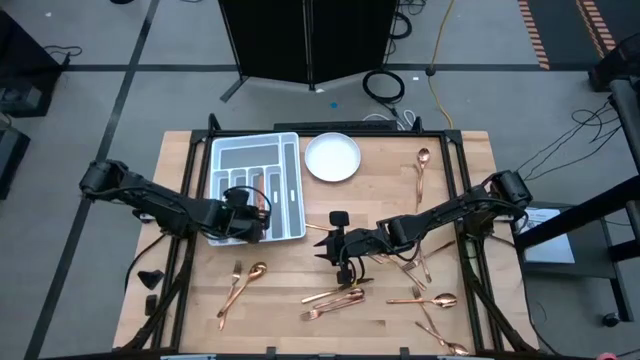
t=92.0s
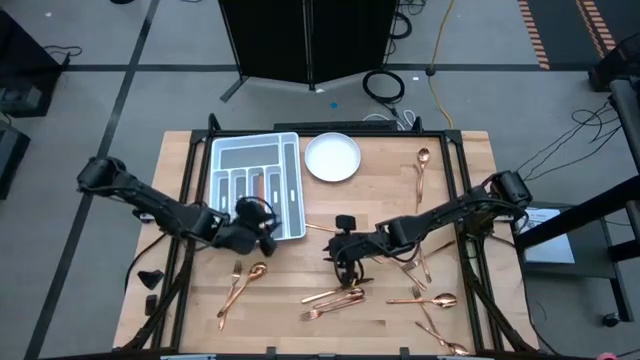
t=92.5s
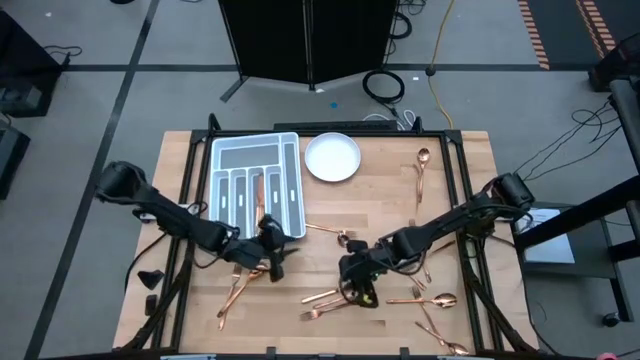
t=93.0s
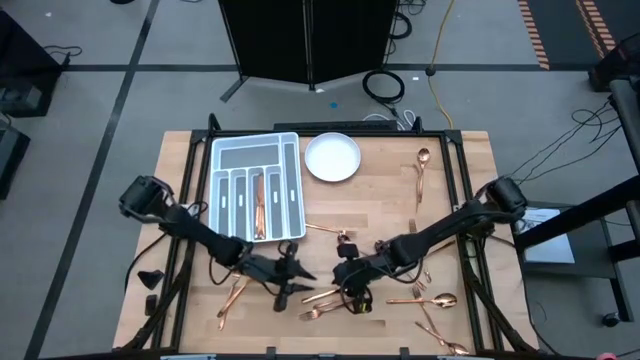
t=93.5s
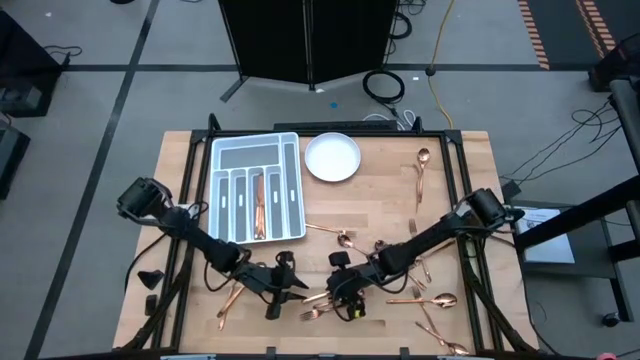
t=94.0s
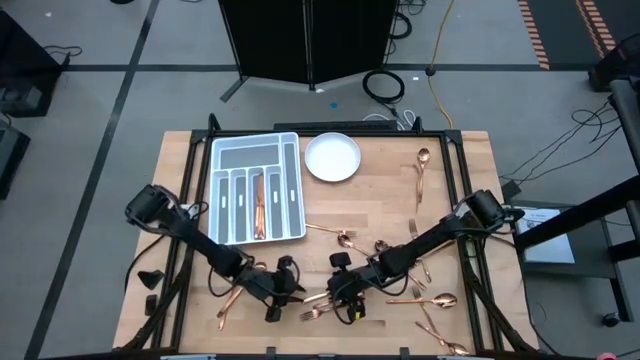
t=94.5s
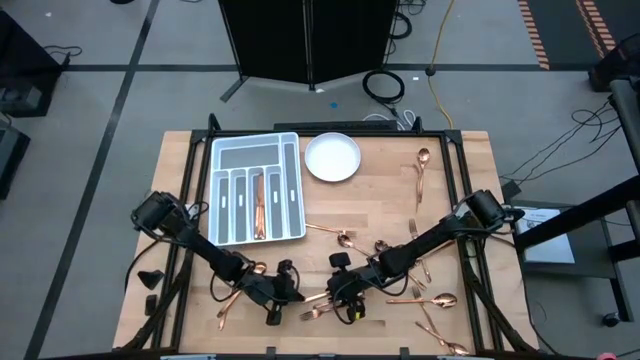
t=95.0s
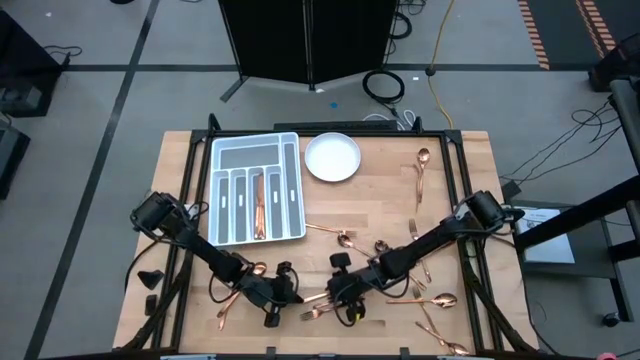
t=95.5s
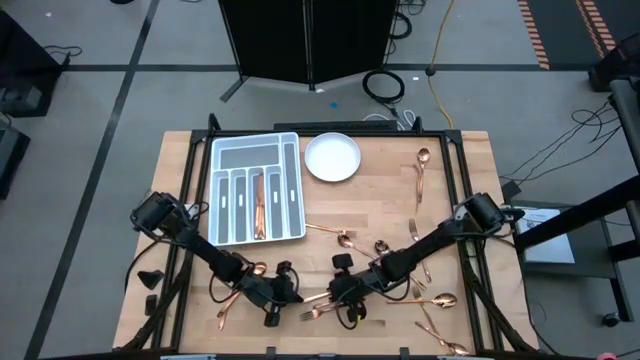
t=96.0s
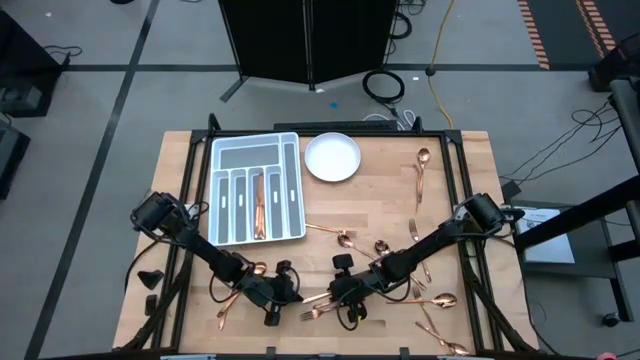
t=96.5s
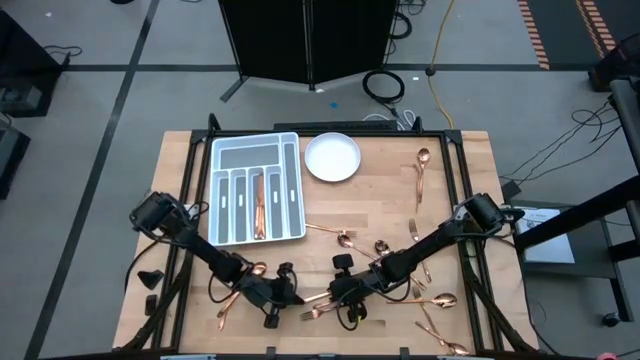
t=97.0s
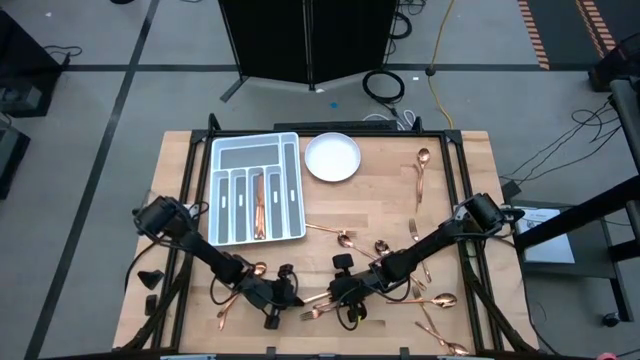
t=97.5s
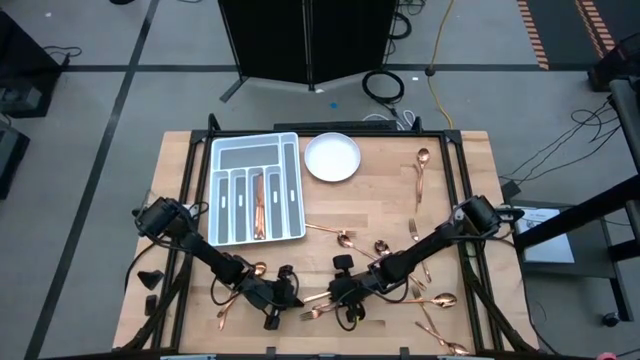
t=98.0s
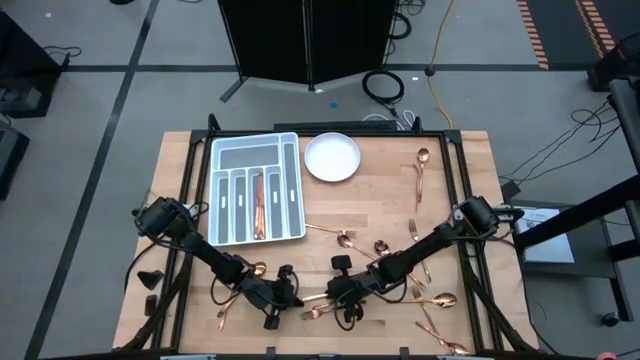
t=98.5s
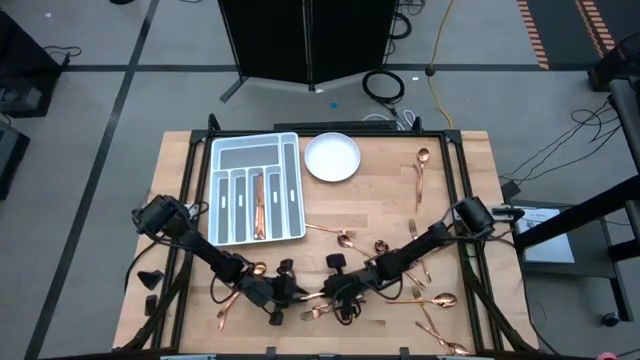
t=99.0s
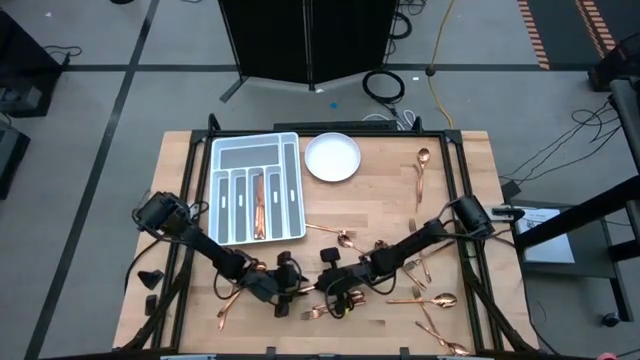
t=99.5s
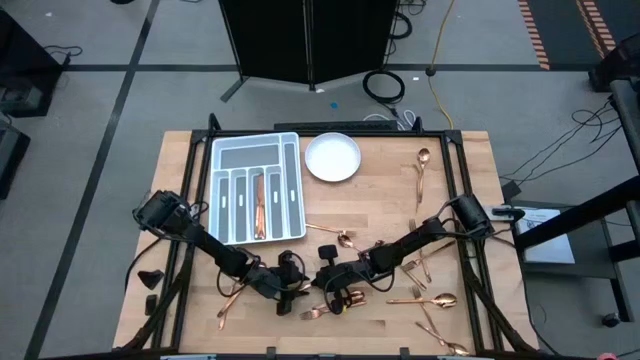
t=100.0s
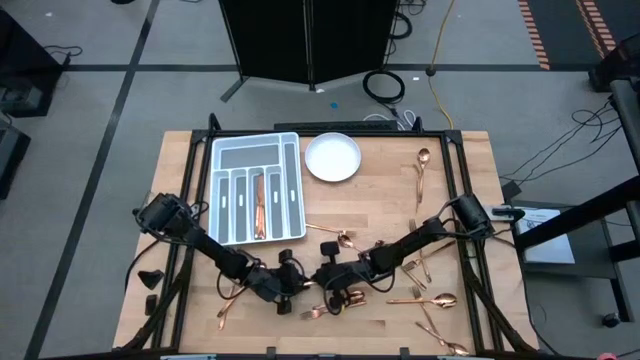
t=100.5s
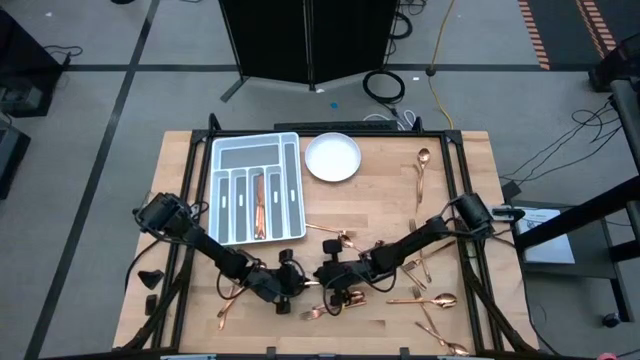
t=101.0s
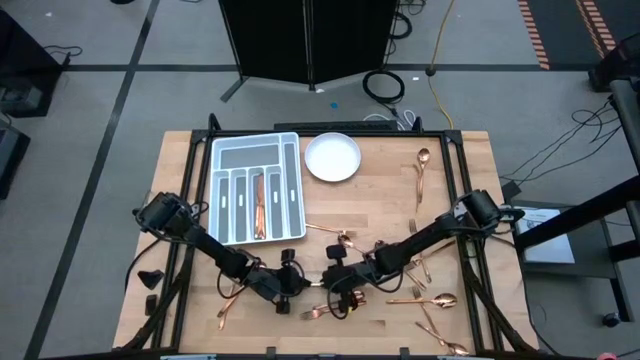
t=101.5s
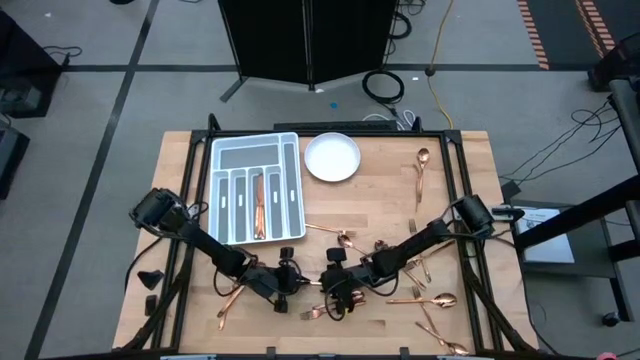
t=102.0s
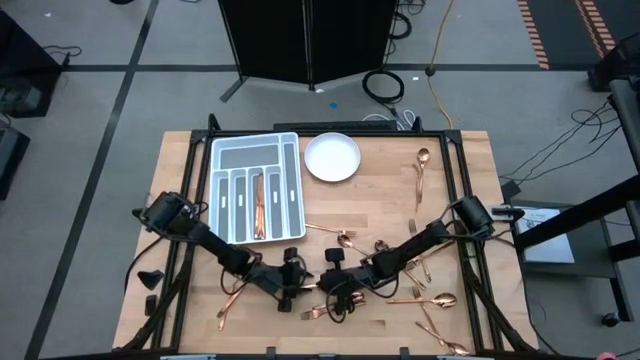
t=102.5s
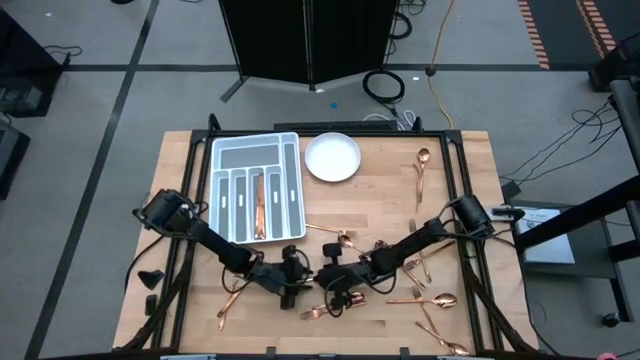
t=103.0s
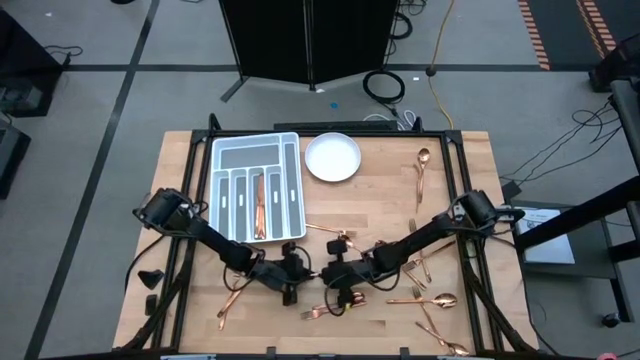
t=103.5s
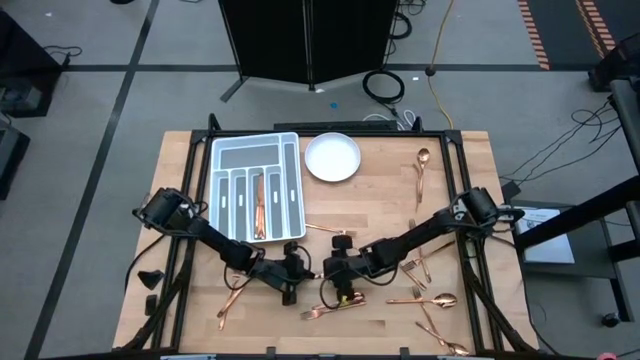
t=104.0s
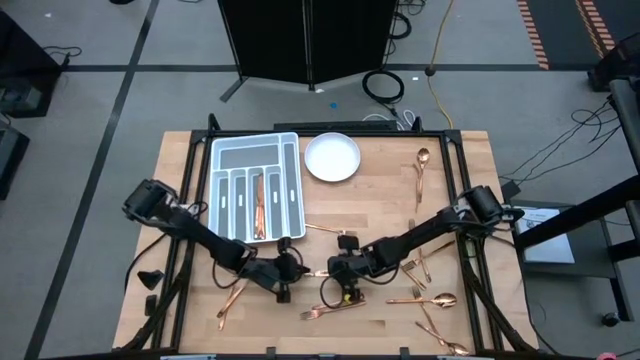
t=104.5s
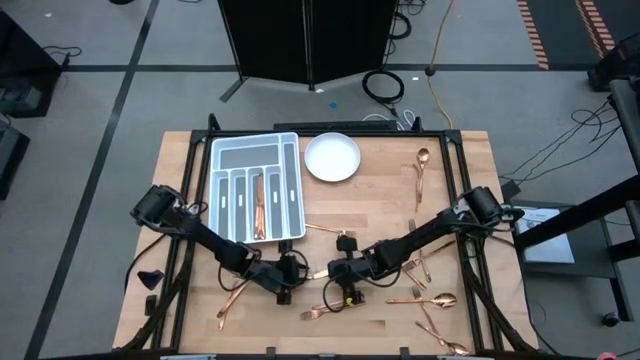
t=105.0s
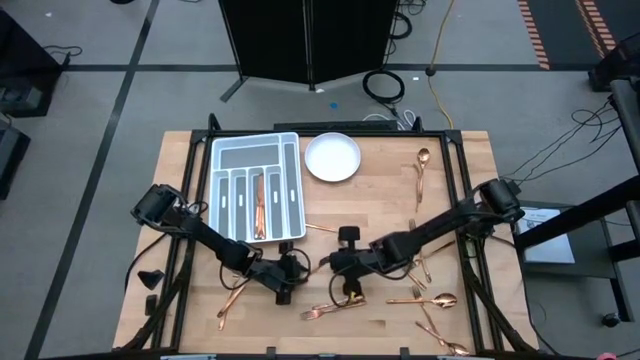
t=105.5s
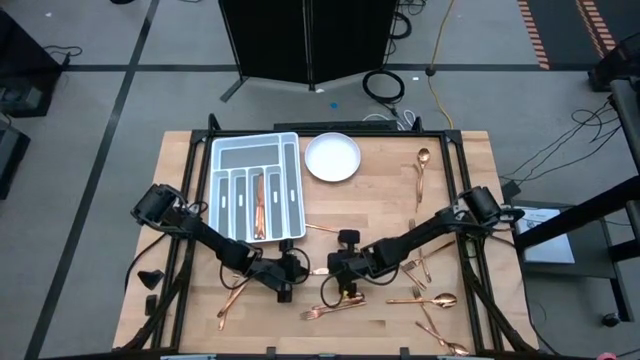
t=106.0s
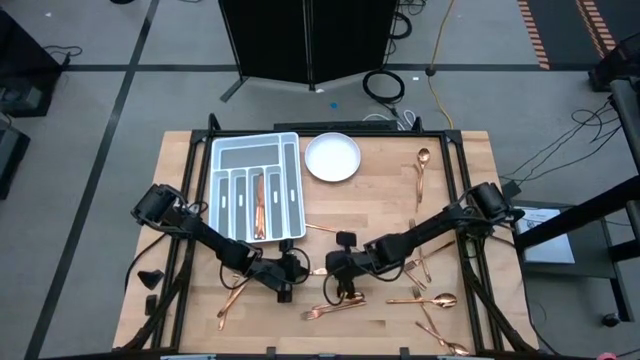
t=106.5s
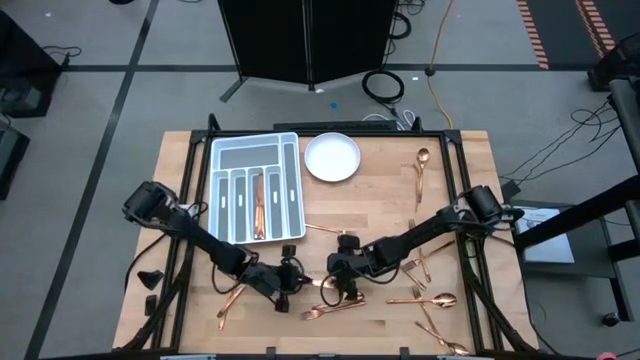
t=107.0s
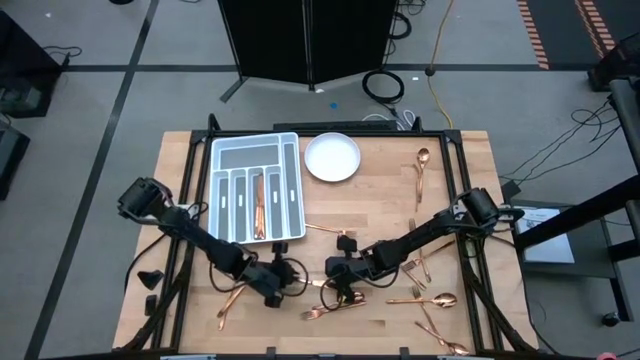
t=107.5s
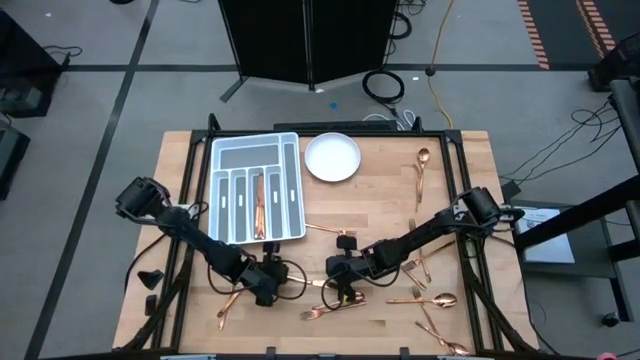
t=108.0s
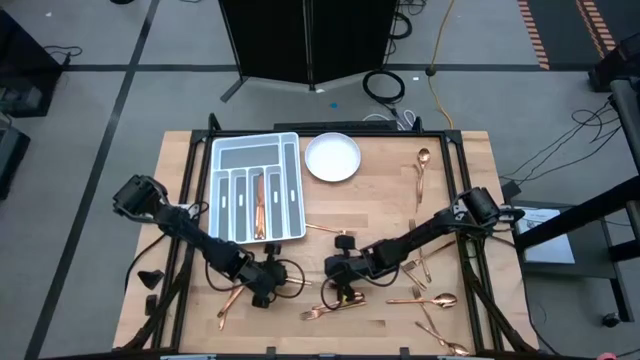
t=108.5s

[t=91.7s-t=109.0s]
Task: Sort silverware
Put the knife on the silverware tray
